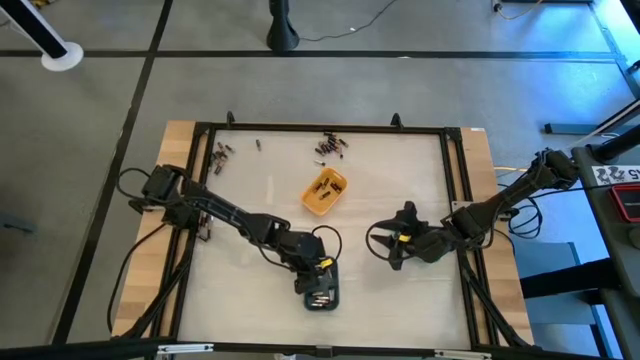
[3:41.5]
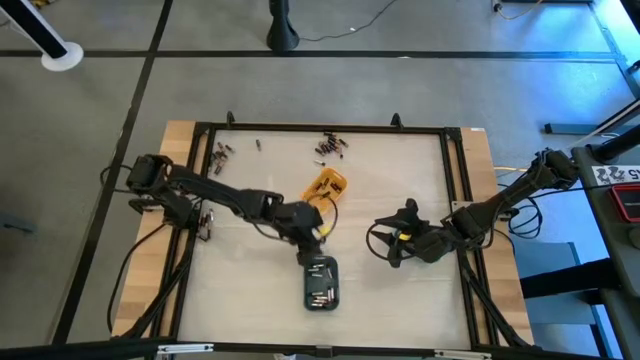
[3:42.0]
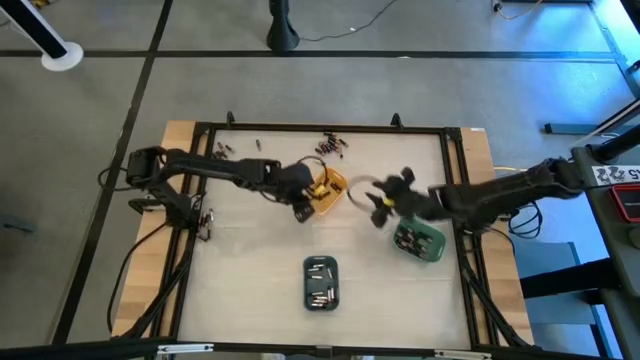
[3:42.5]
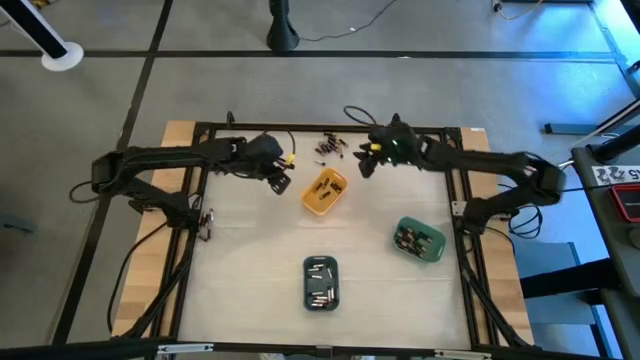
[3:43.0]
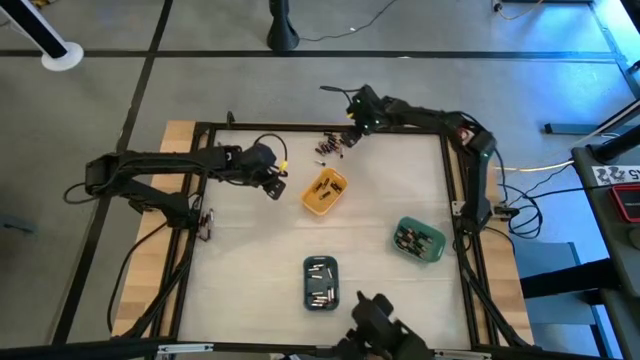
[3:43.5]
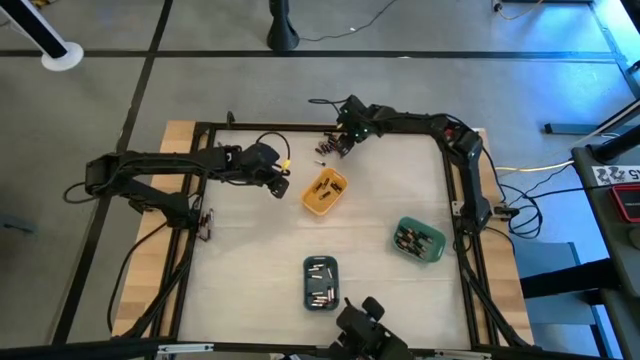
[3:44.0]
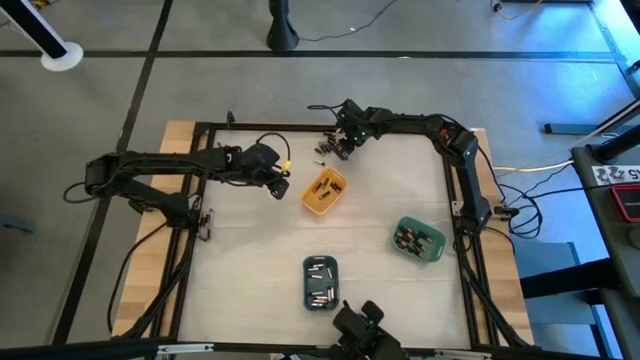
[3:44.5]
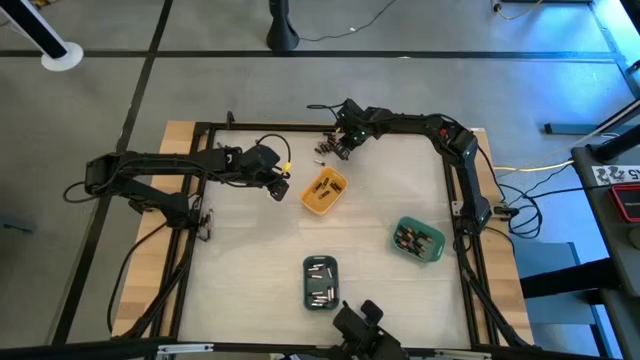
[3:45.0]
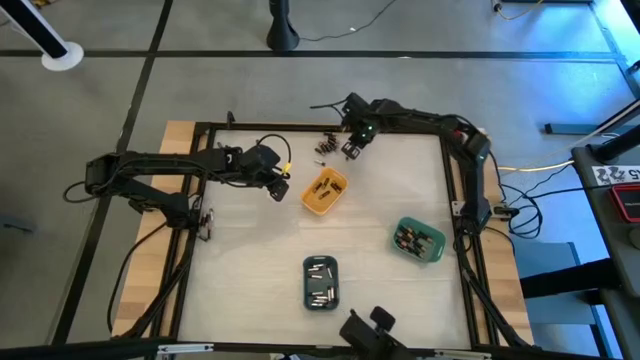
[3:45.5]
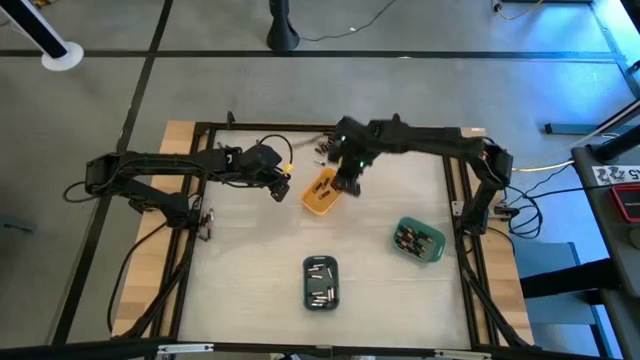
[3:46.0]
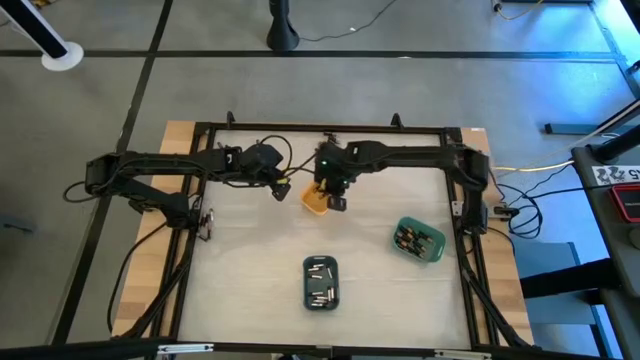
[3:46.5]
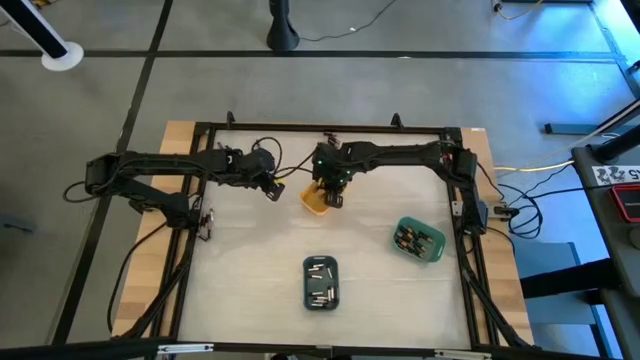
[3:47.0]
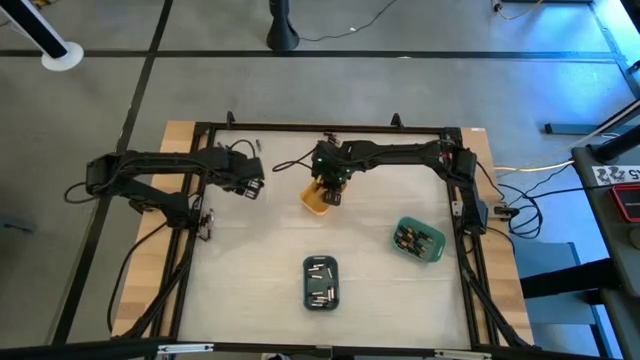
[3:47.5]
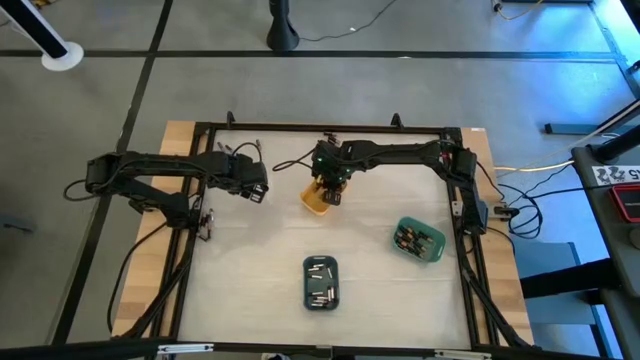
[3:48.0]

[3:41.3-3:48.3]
Task: Sort batteries
Put the black battery into the yellow bin

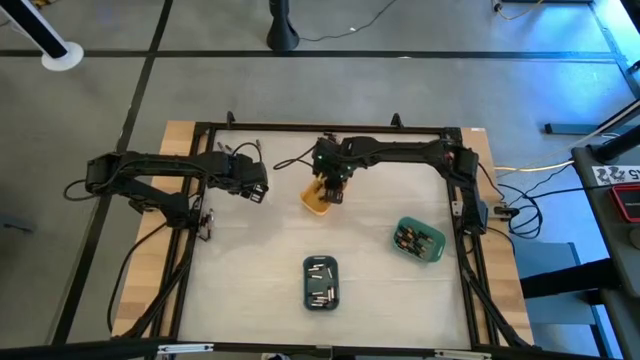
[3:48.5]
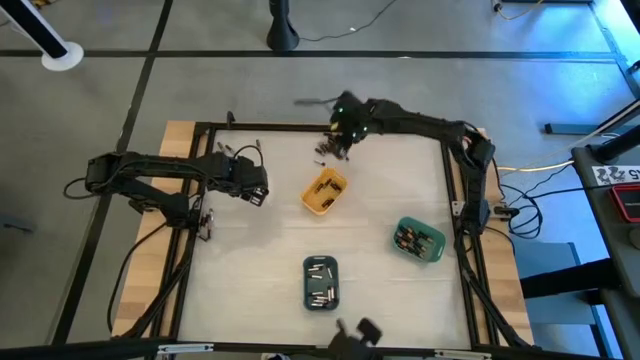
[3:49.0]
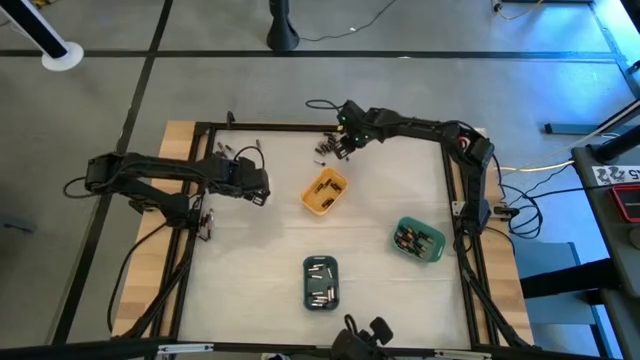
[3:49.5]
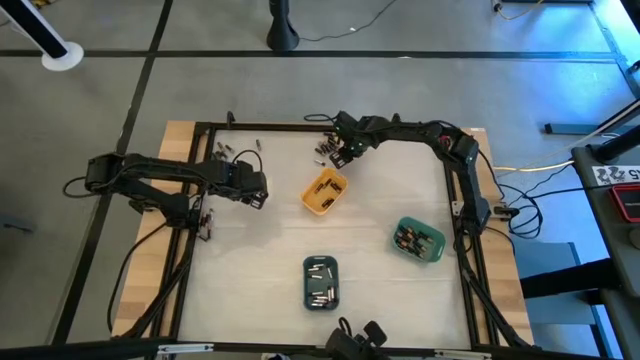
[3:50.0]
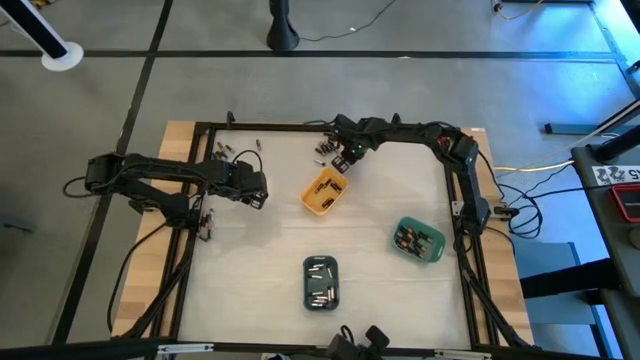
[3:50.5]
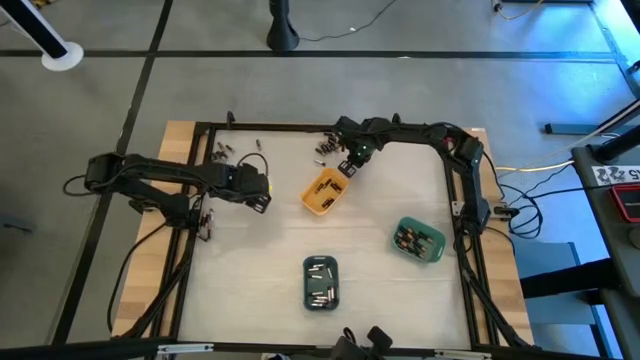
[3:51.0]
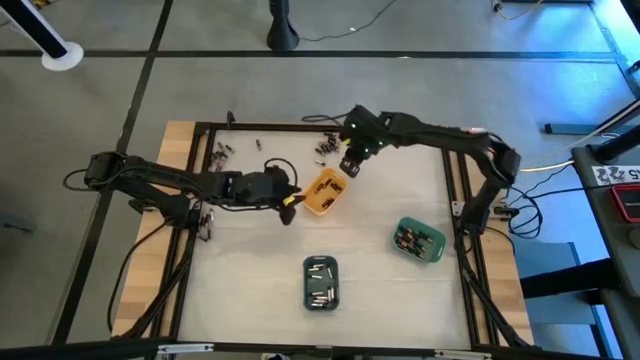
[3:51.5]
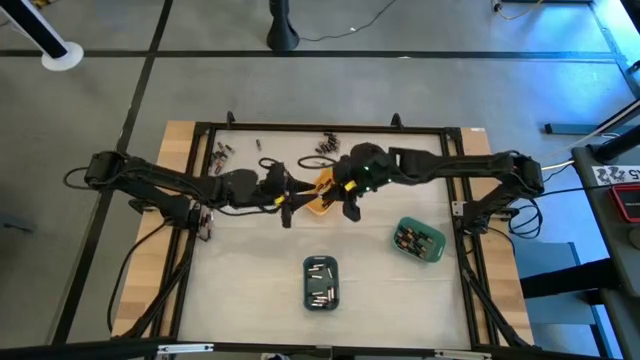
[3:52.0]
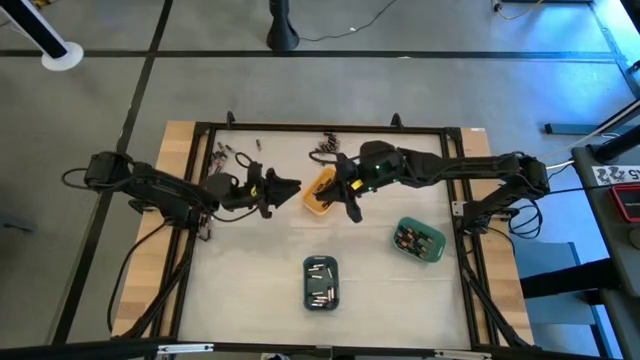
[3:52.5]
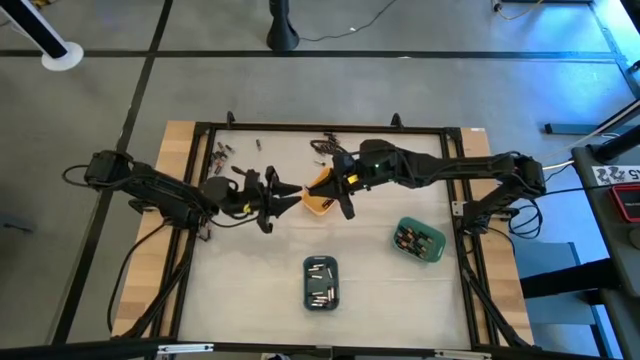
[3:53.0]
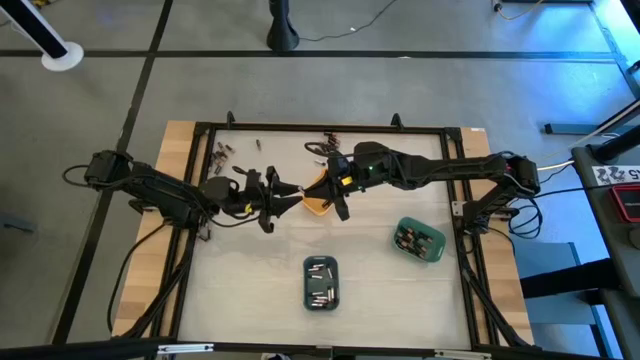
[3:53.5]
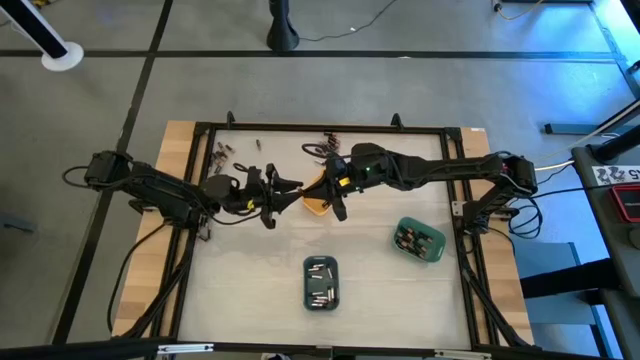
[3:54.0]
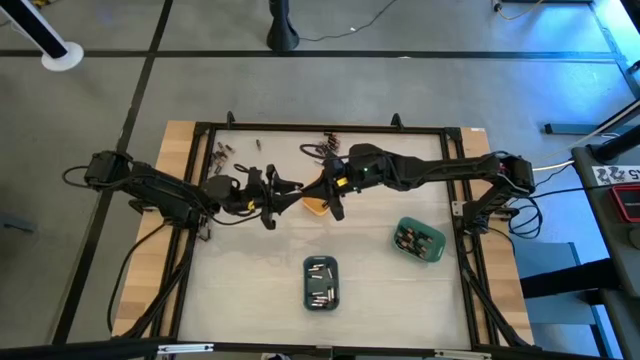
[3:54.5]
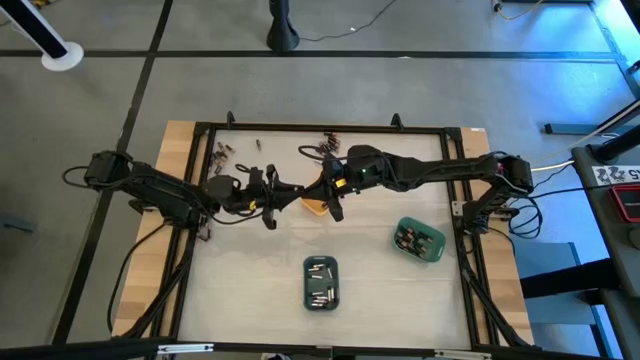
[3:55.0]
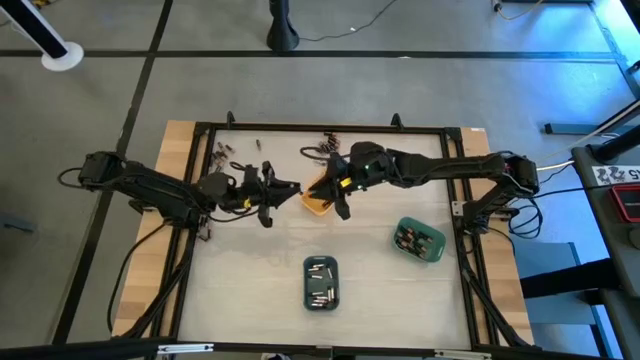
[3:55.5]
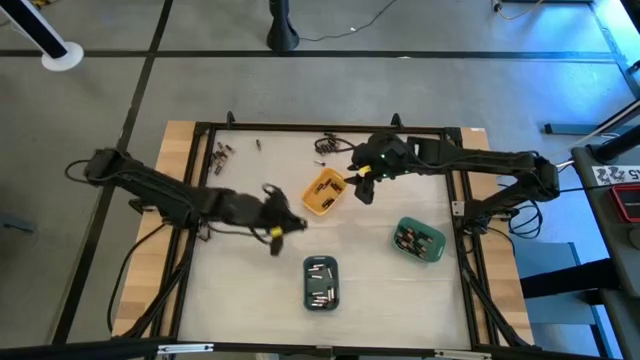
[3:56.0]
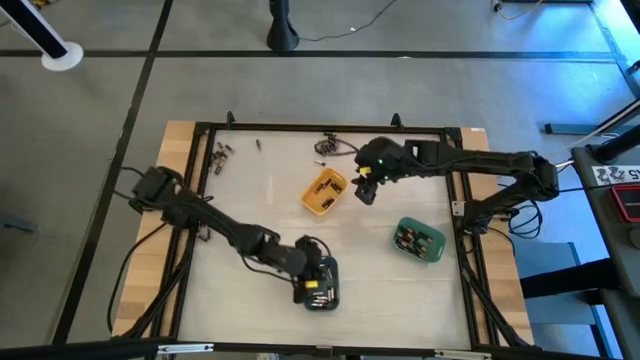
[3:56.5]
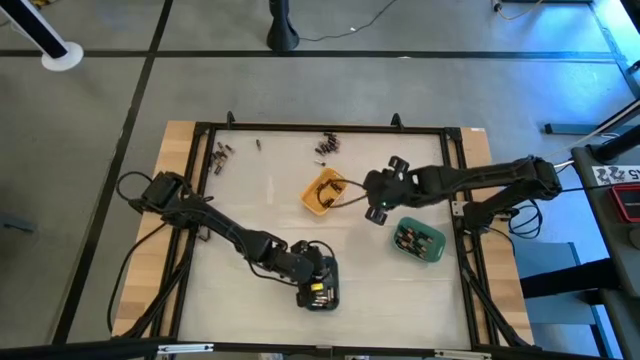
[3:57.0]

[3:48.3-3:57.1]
Put the silver battery into the blue bin

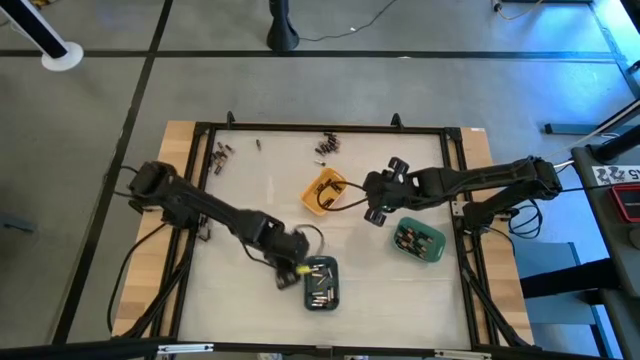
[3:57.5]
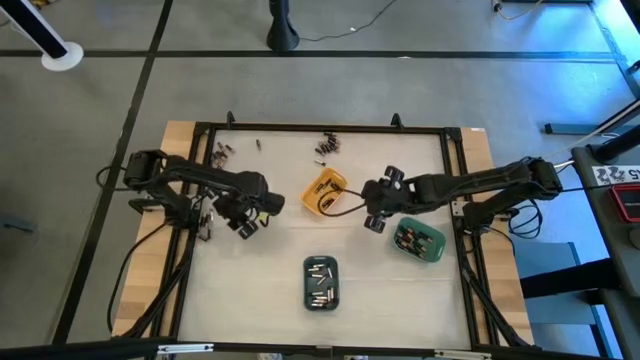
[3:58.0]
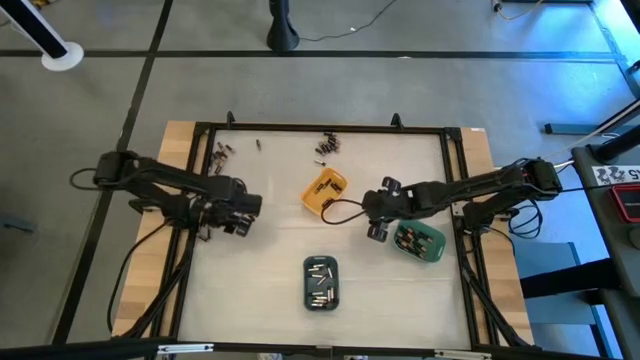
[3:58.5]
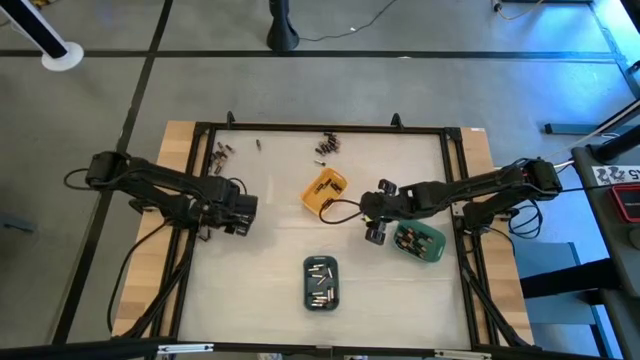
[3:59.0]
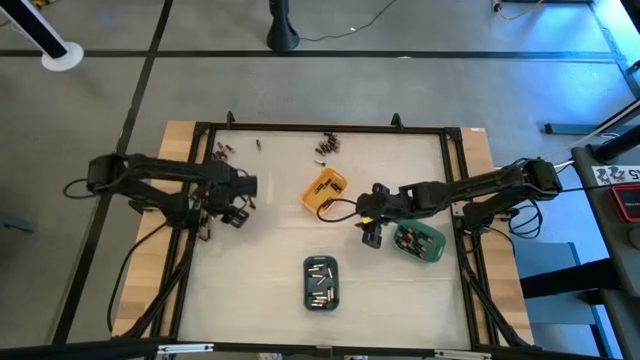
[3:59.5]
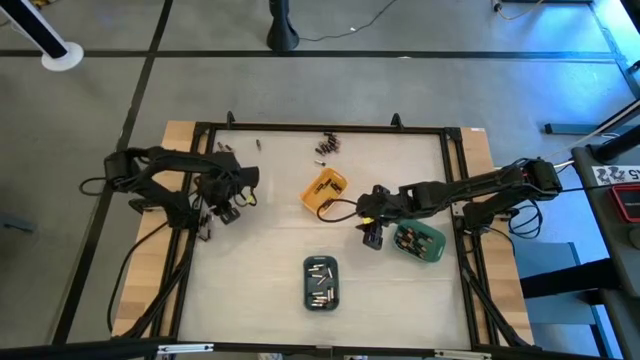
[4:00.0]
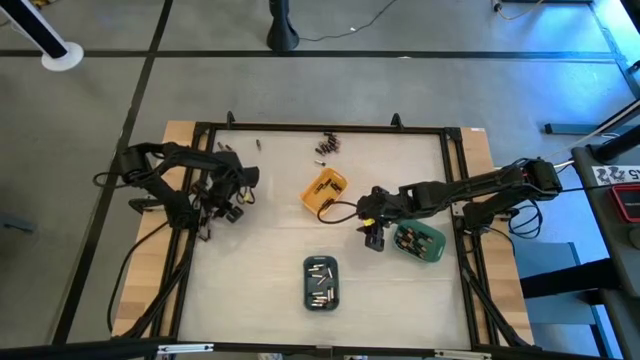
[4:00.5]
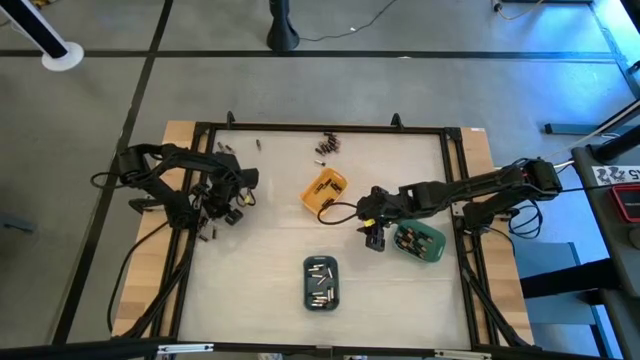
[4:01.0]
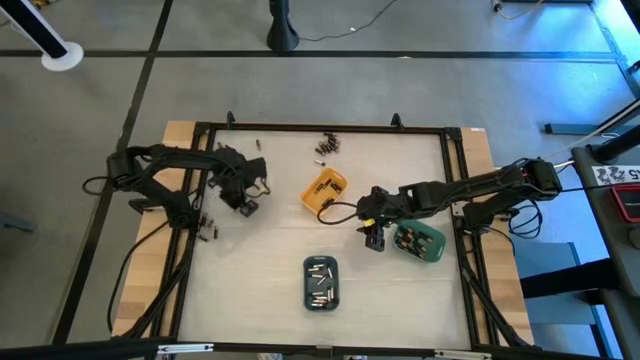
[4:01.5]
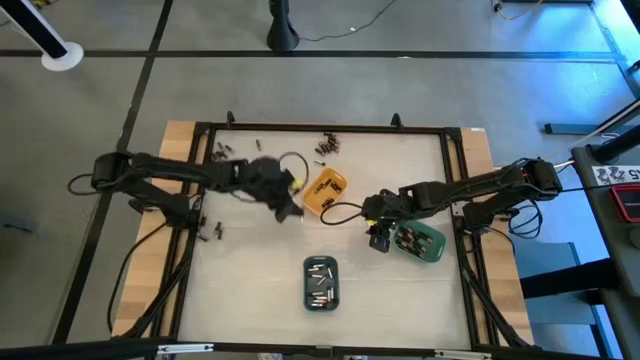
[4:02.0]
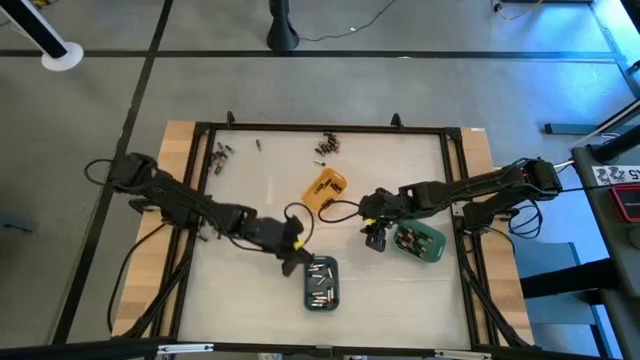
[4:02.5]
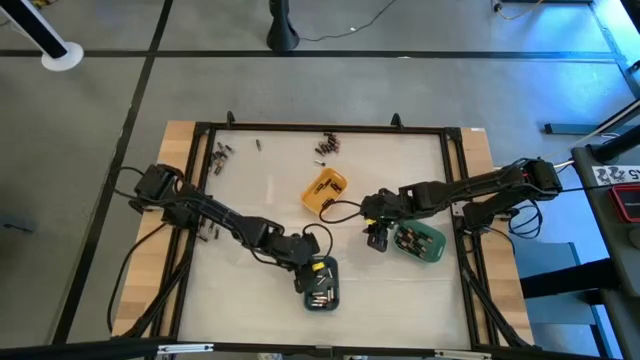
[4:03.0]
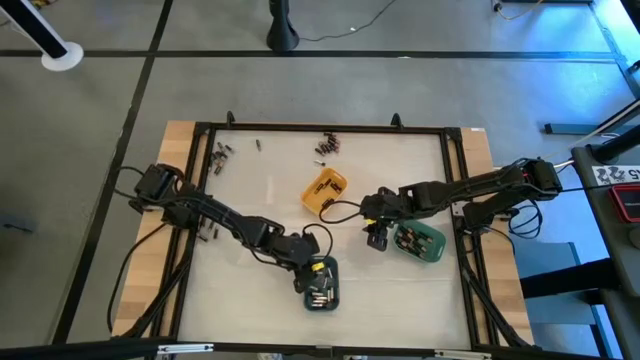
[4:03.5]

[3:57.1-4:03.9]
Put the silver battery into the blue bin
